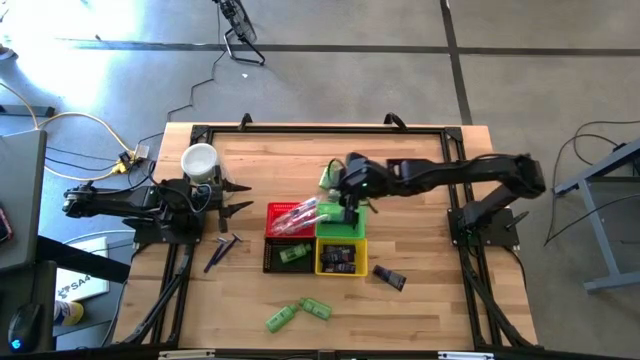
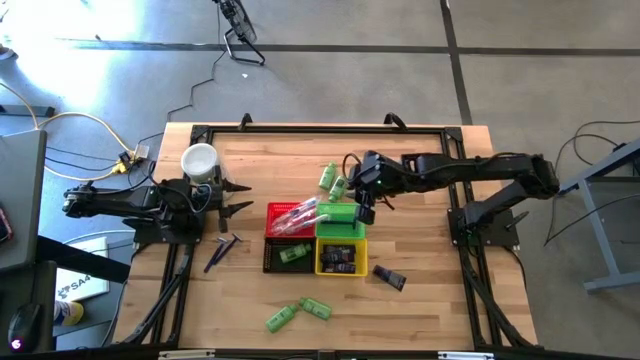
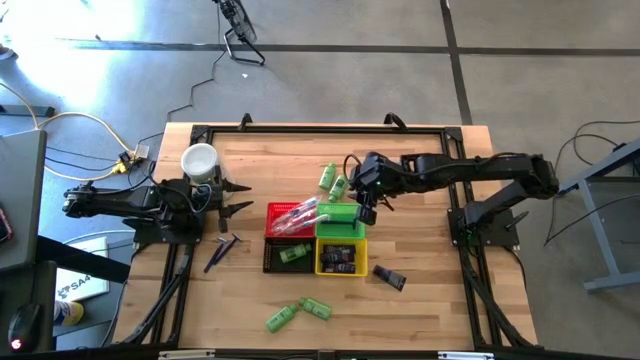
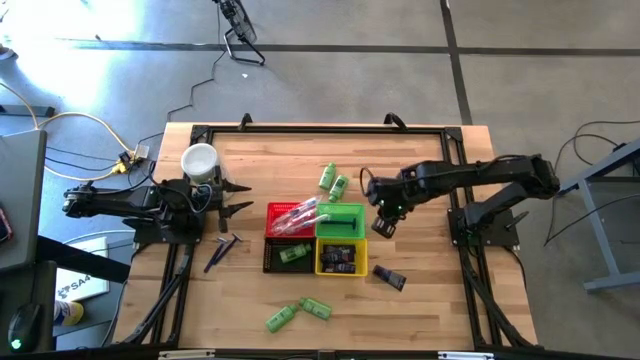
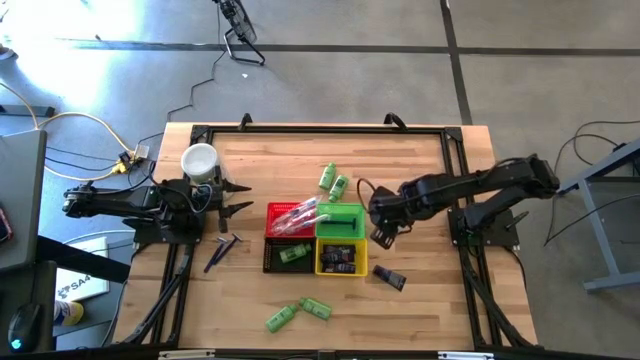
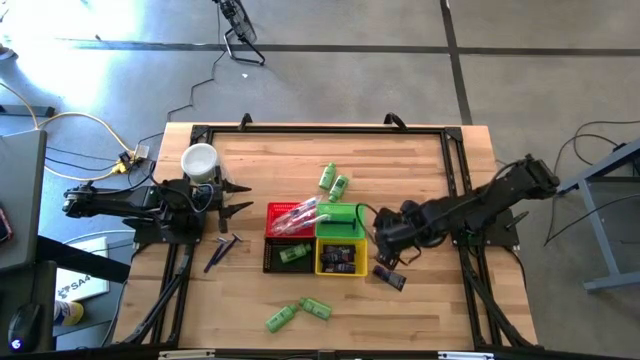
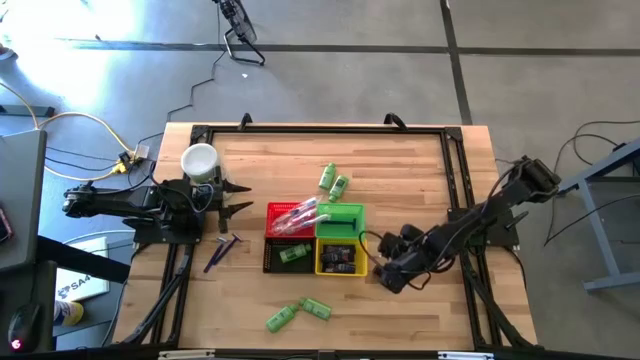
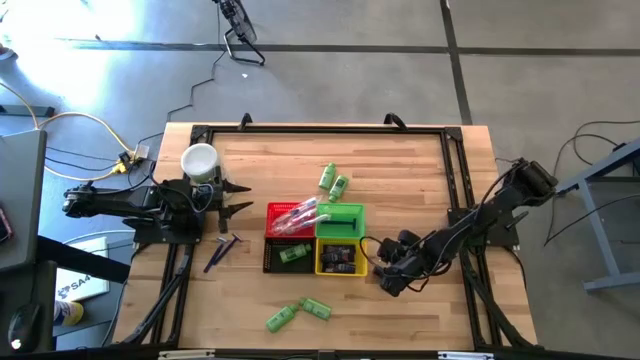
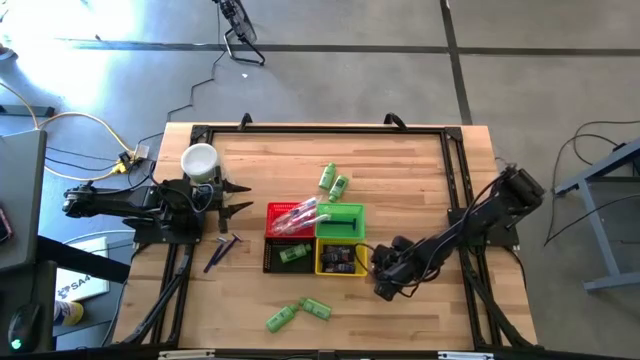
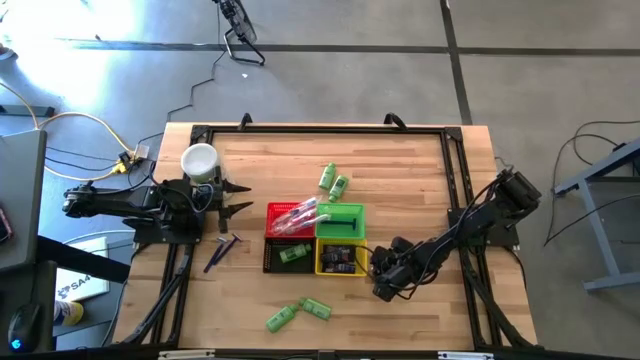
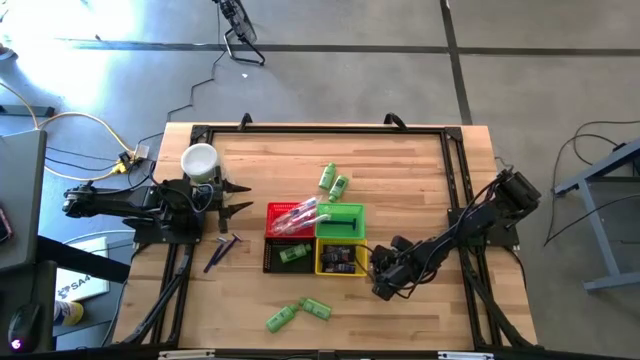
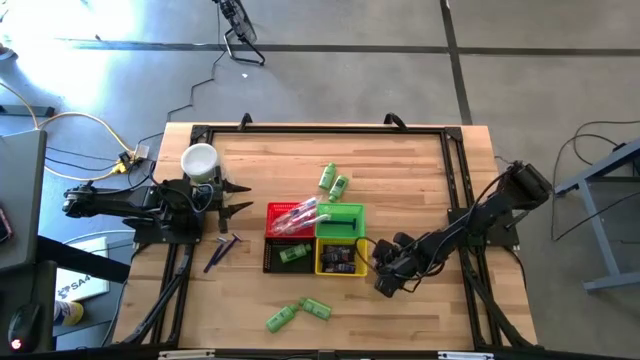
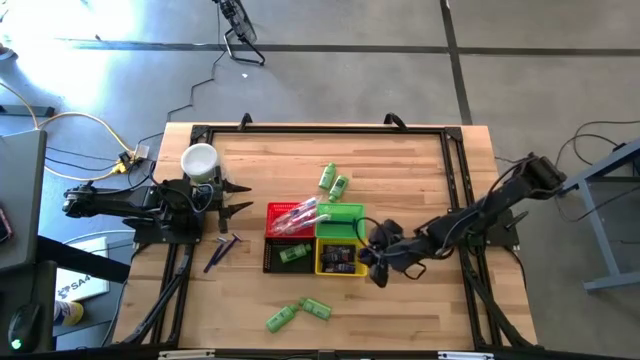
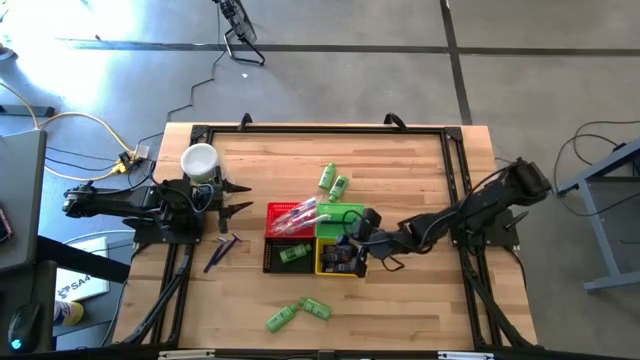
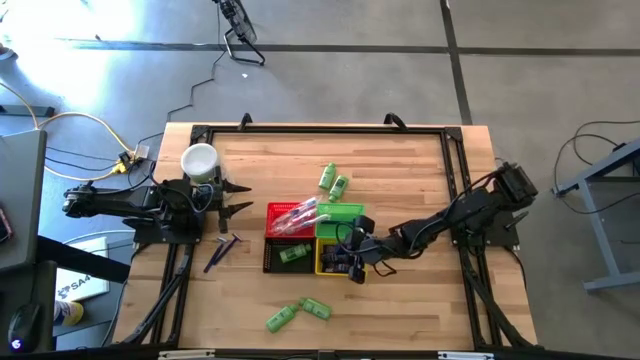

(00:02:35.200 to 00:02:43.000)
Task: Pick & Place Travel size toiletries
Put the dark blue shaving cream into the yellow bin

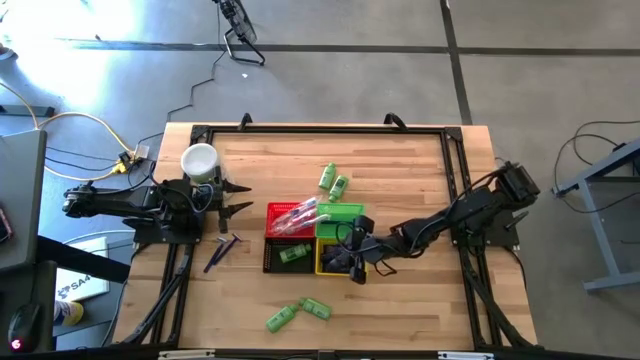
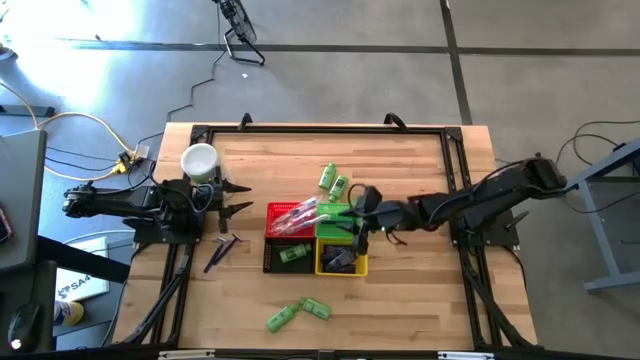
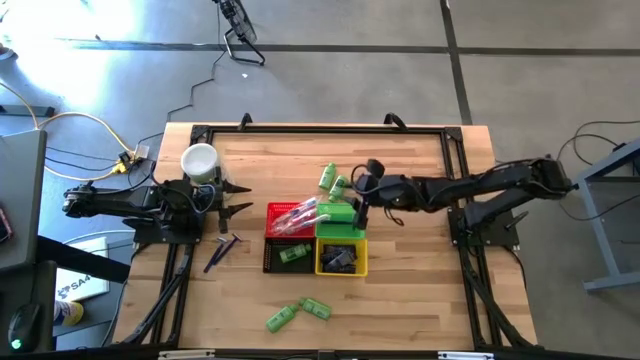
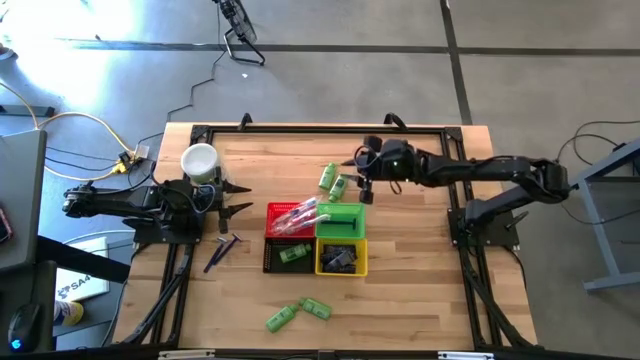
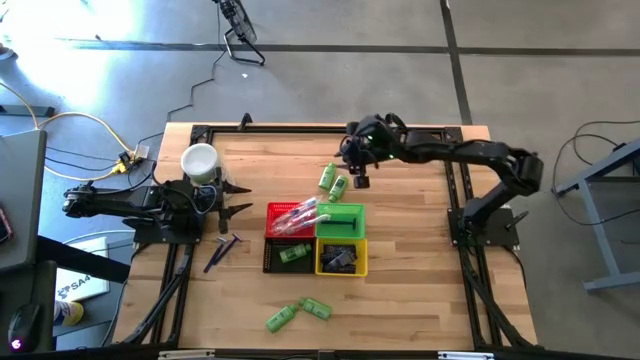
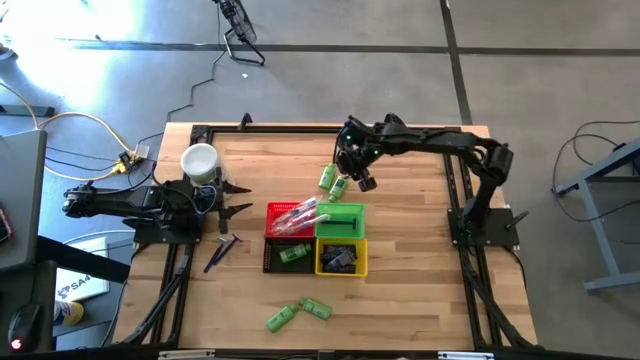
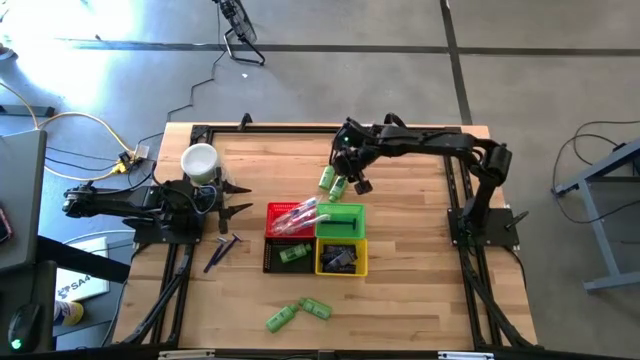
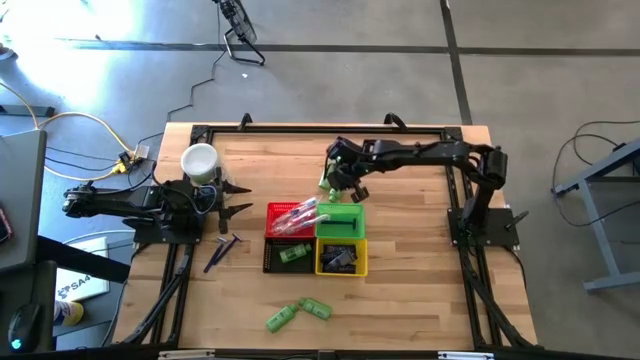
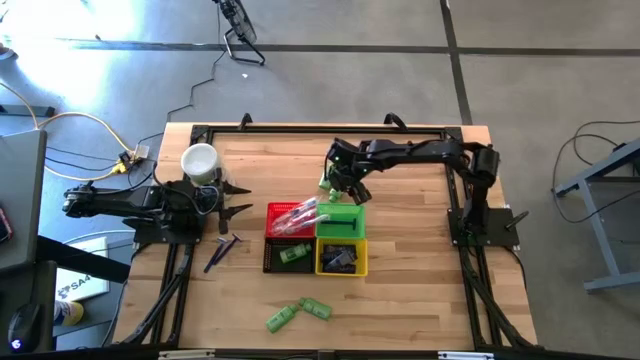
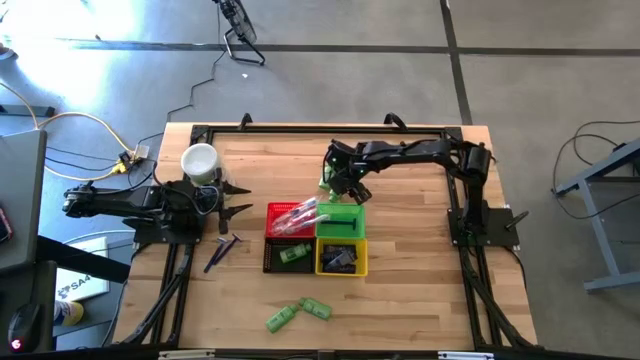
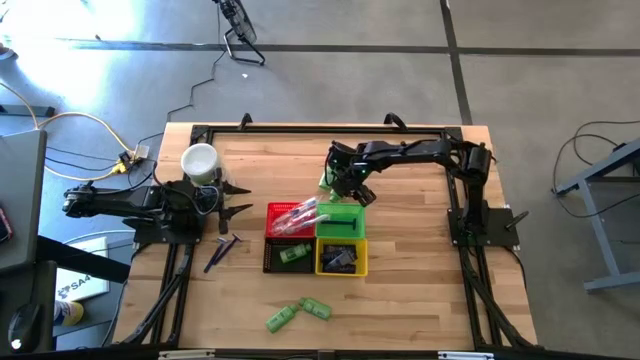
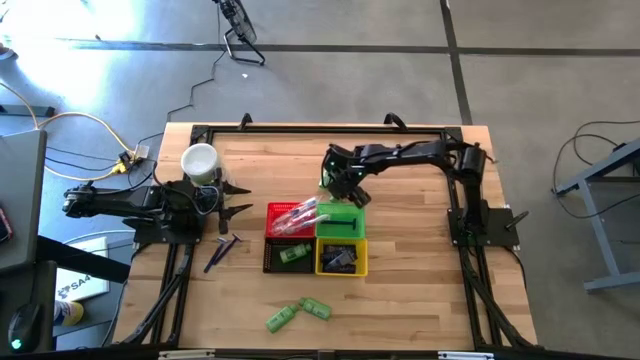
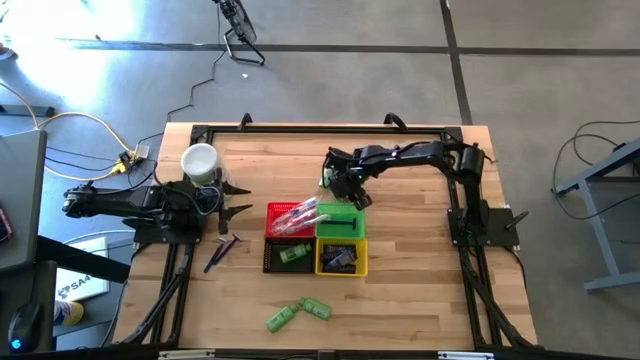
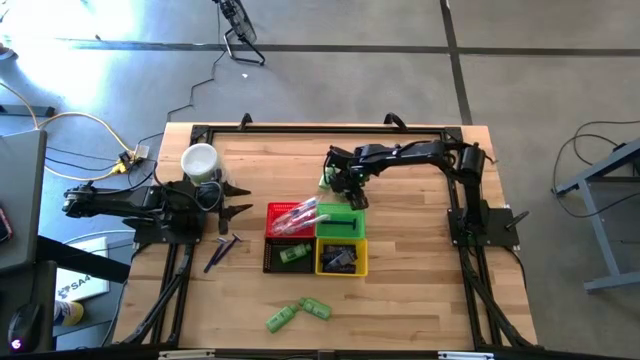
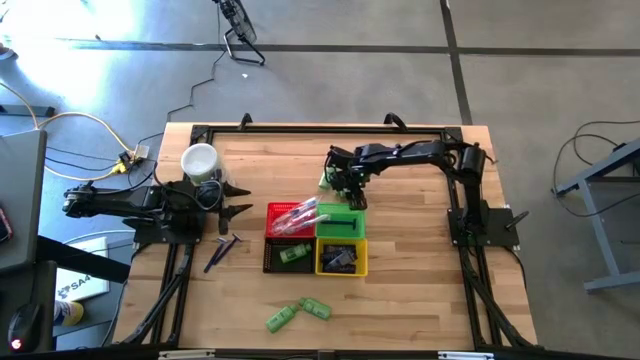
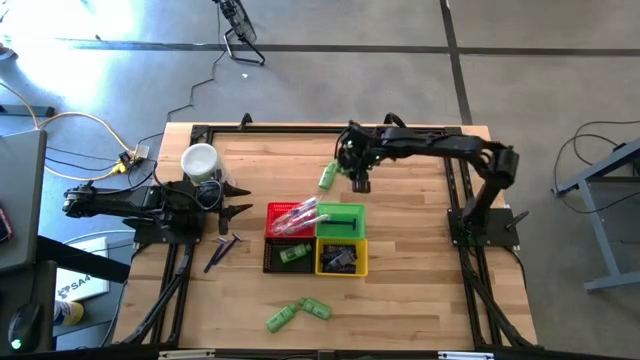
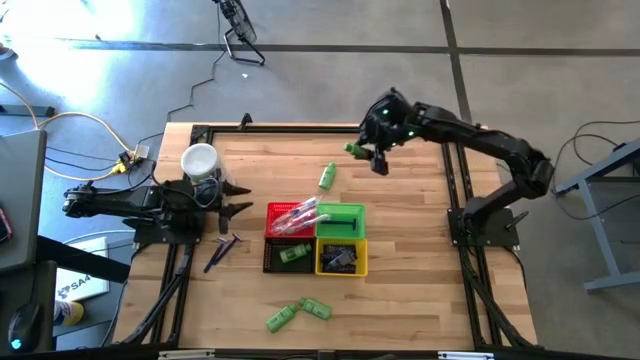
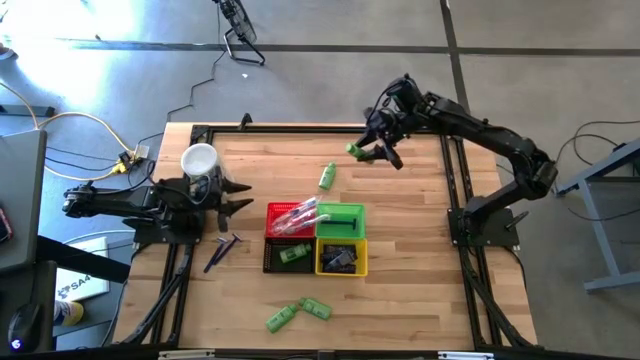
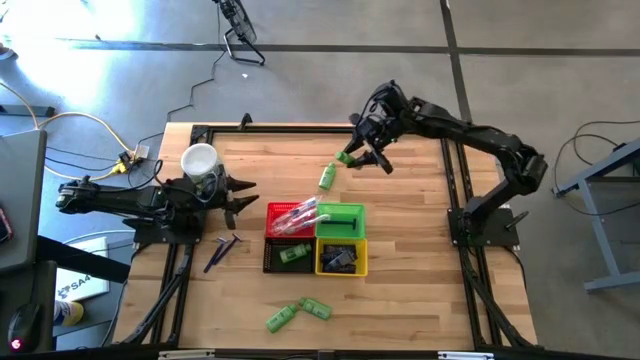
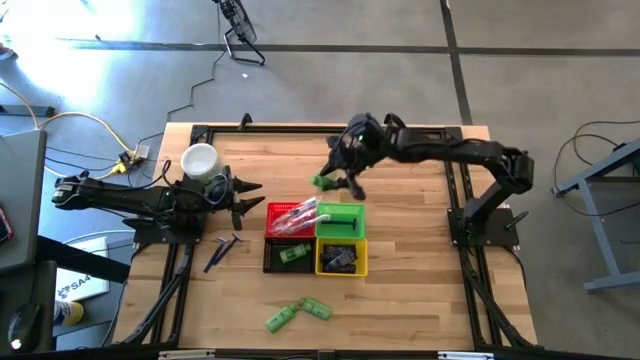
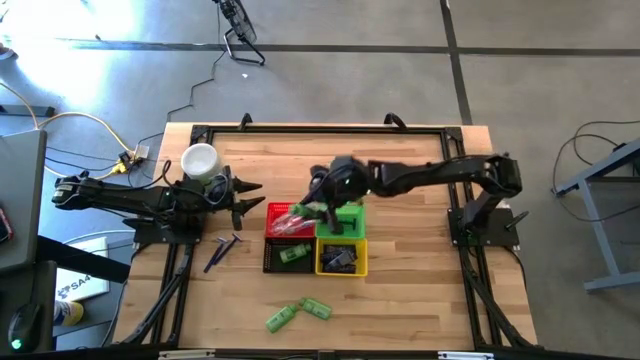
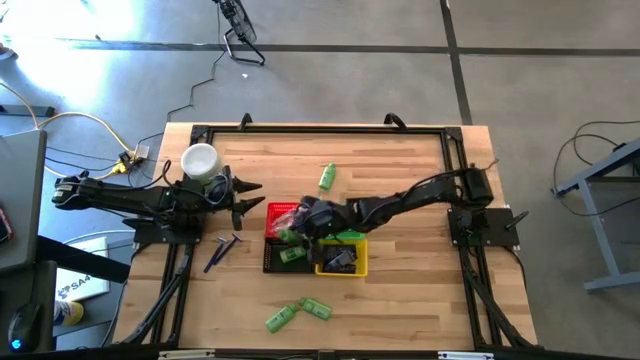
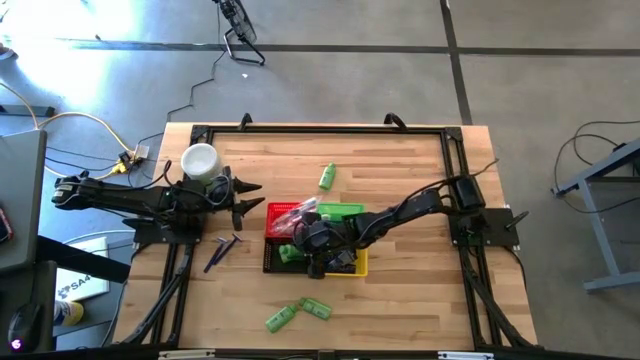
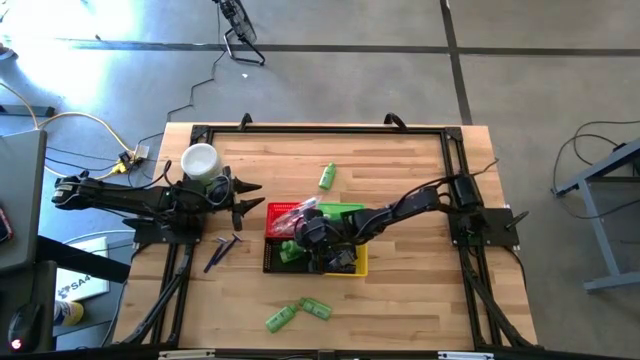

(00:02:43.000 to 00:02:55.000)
Put the green shampoo bottle into the black bin

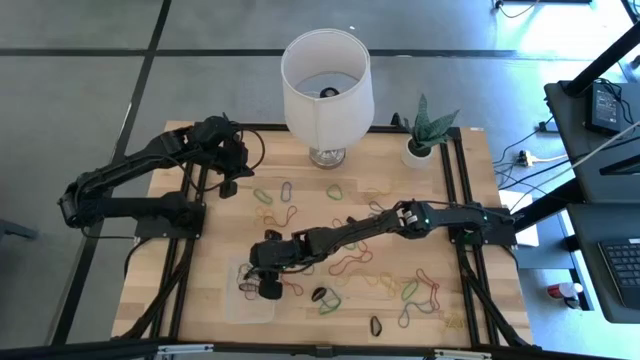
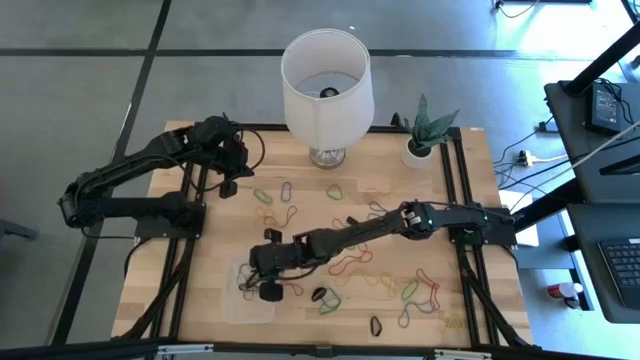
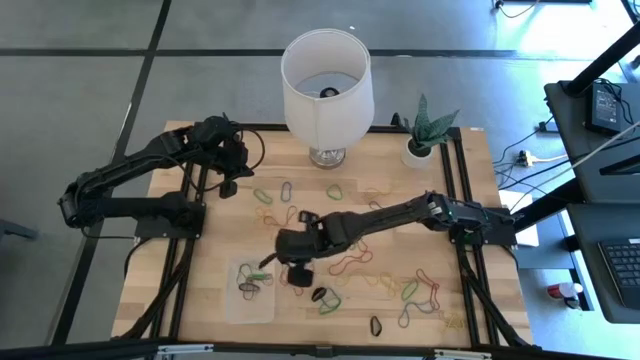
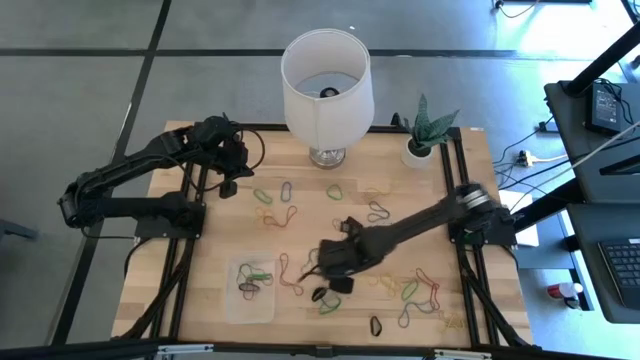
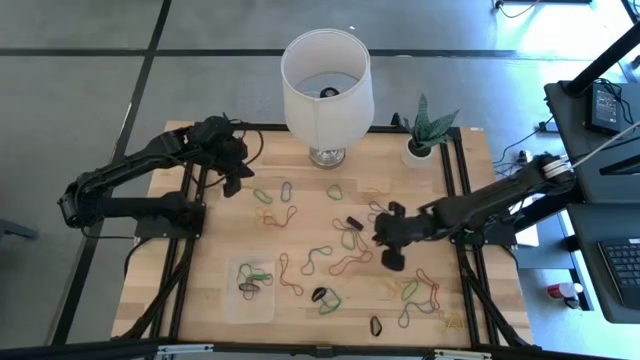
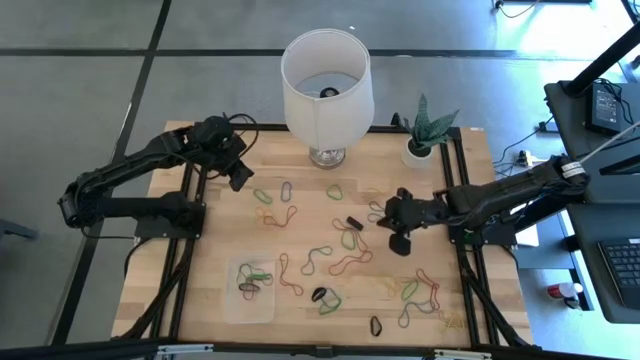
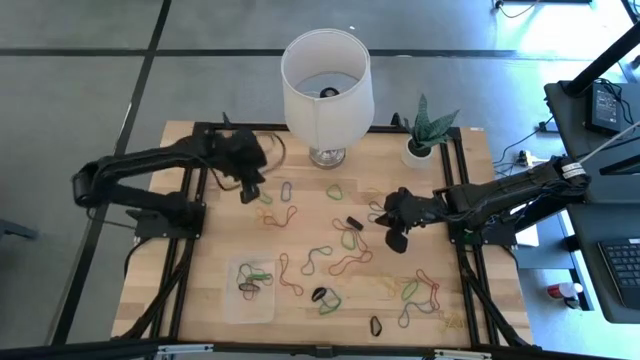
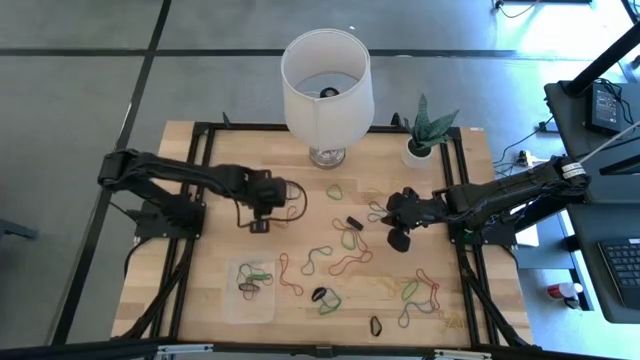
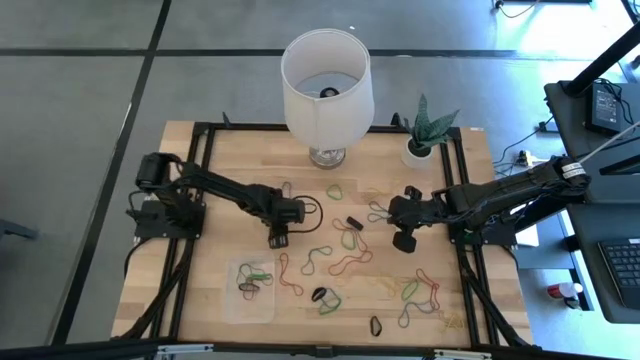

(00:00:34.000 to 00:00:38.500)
Task: Pick and place rubber bands into bin
Put the red rubber band into the transparent bin
